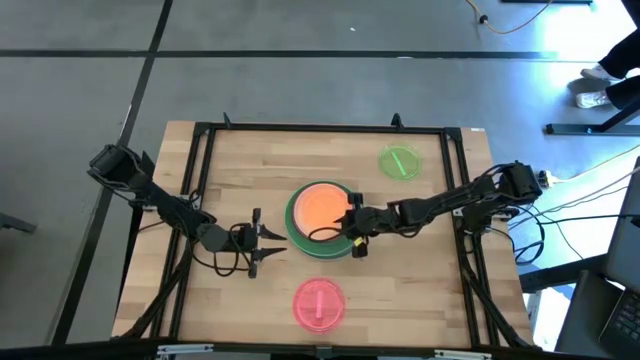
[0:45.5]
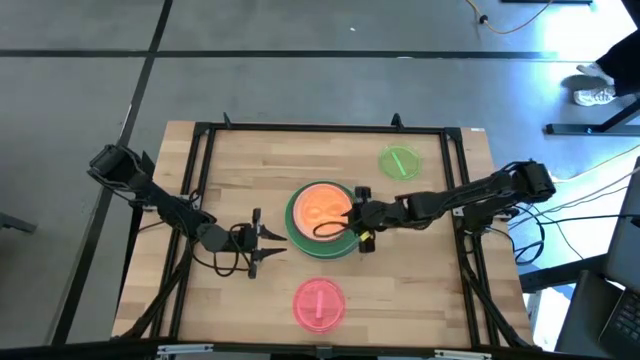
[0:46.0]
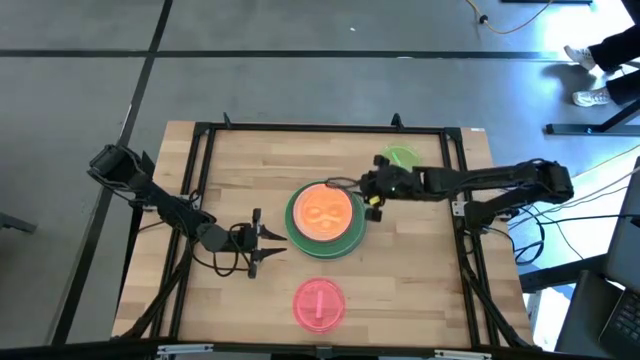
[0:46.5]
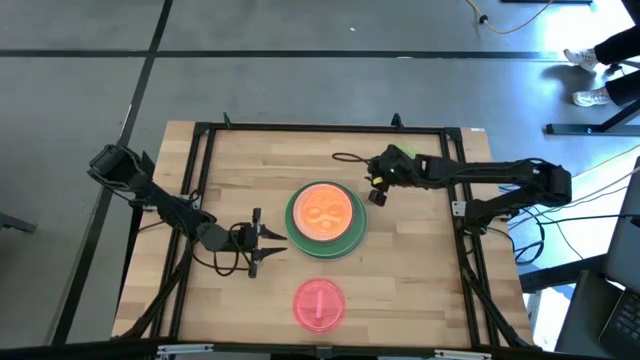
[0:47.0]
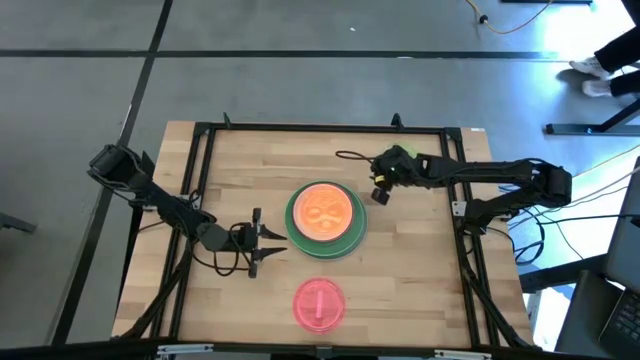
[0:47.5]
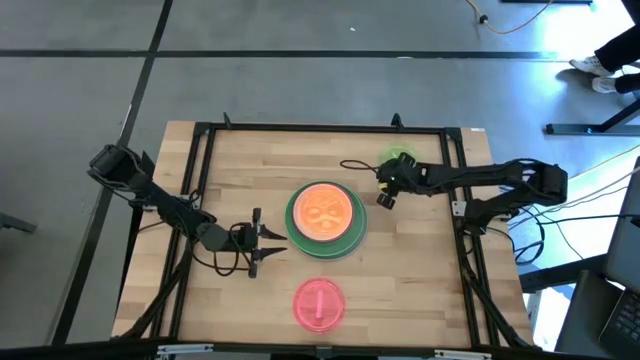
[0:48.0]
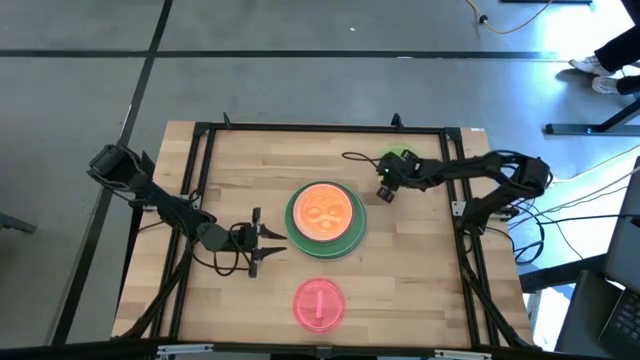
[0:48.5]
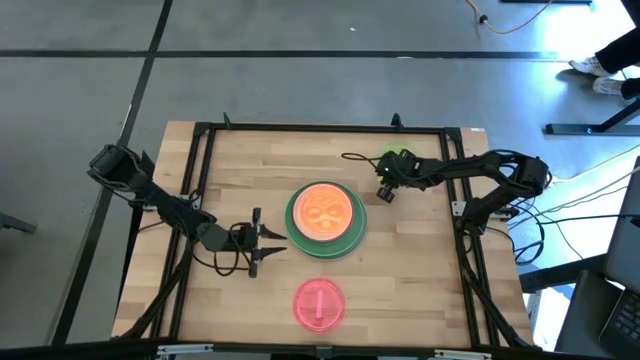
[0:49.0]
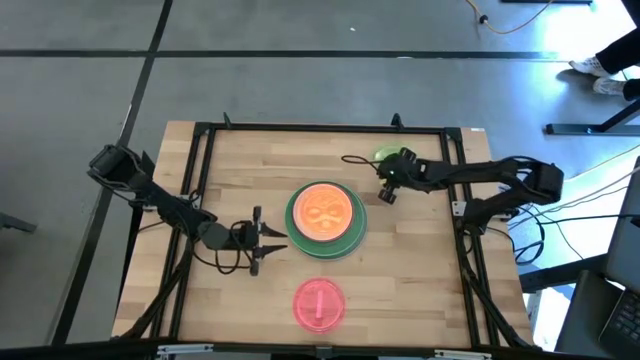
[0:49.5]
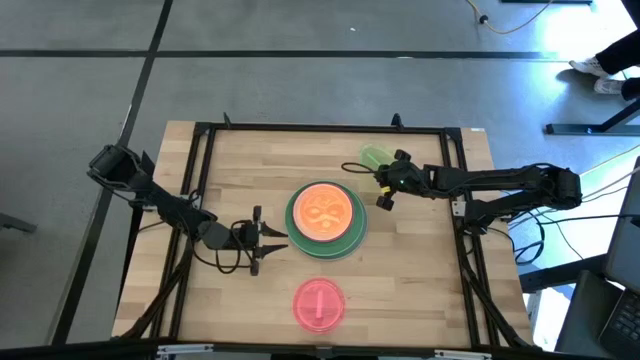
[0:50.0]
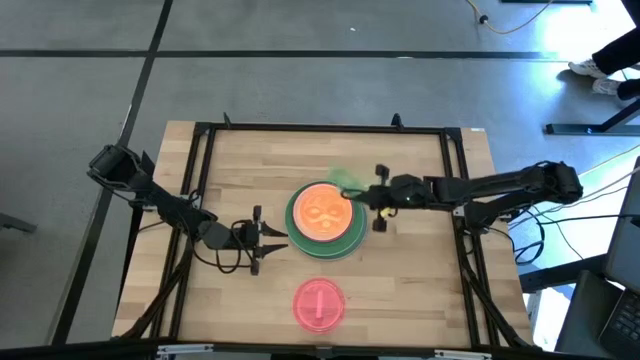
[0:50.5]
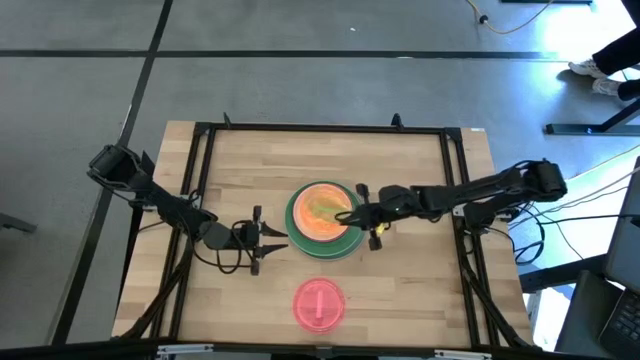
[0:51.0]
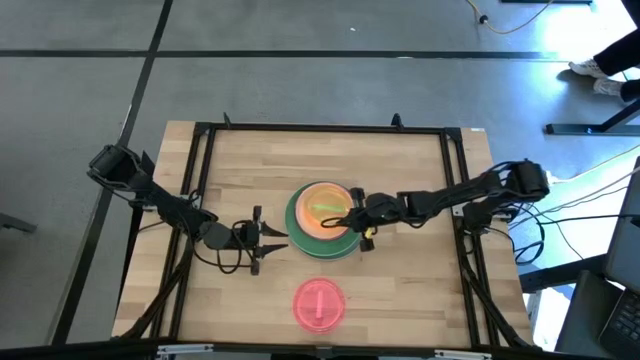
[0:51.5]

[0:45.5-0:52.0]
Task: Stack plastic plates
Stack the light green plate on top of the orange plate

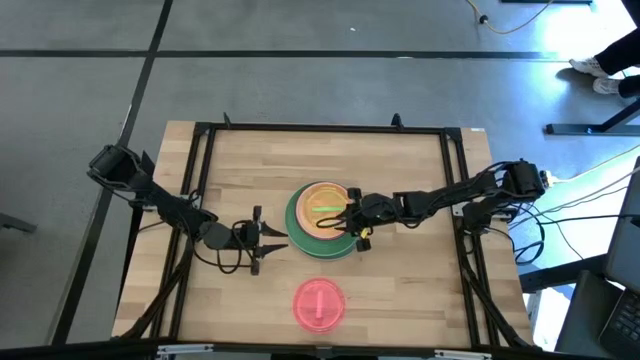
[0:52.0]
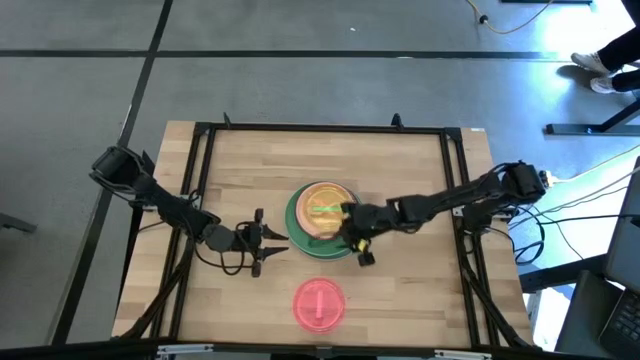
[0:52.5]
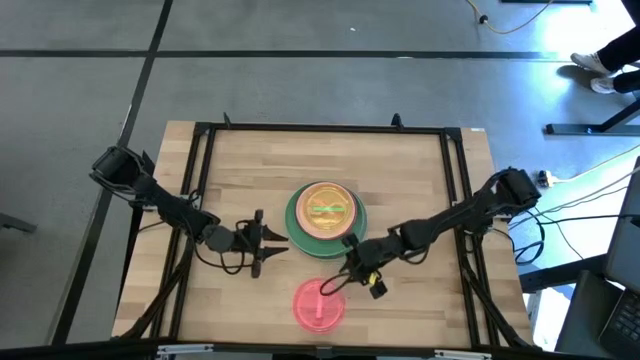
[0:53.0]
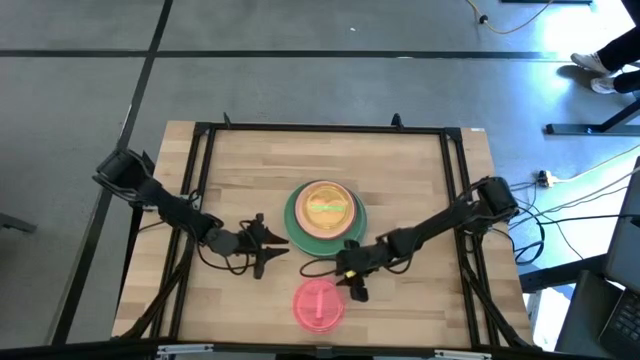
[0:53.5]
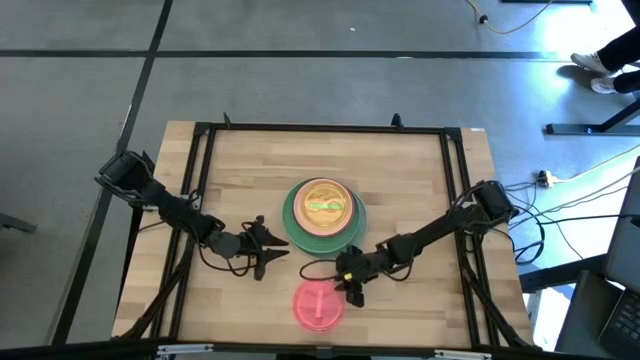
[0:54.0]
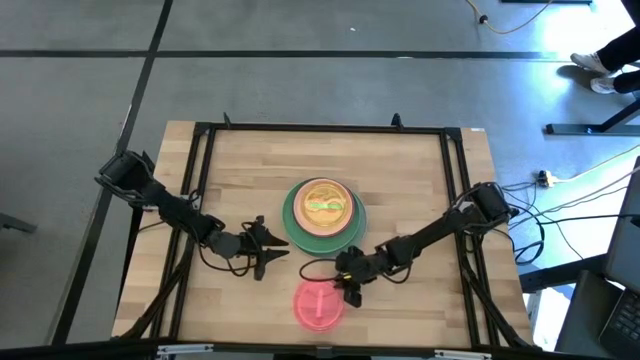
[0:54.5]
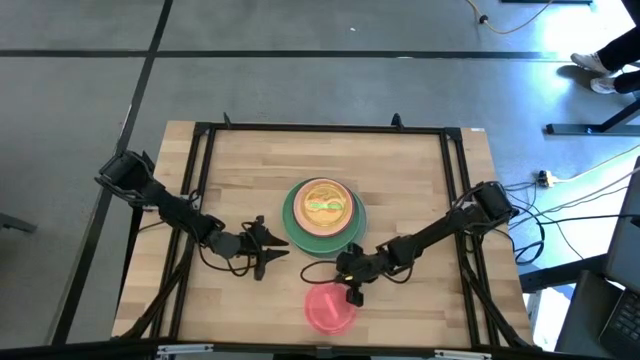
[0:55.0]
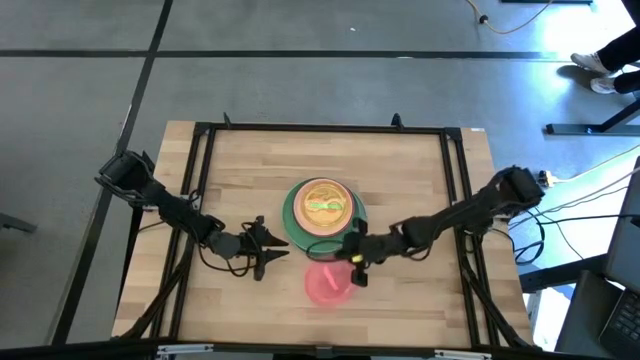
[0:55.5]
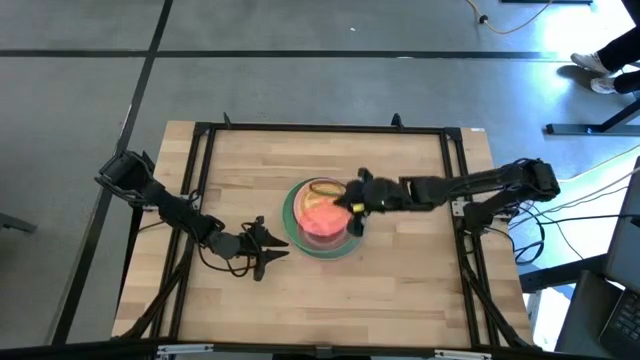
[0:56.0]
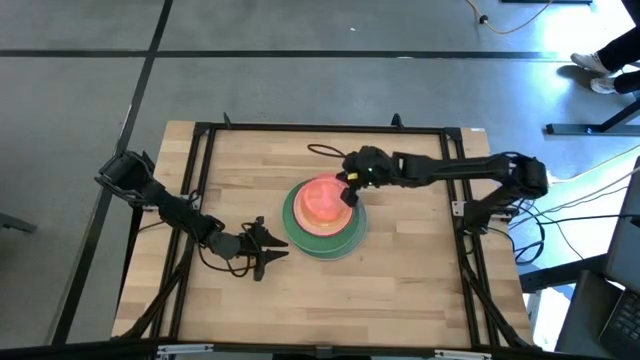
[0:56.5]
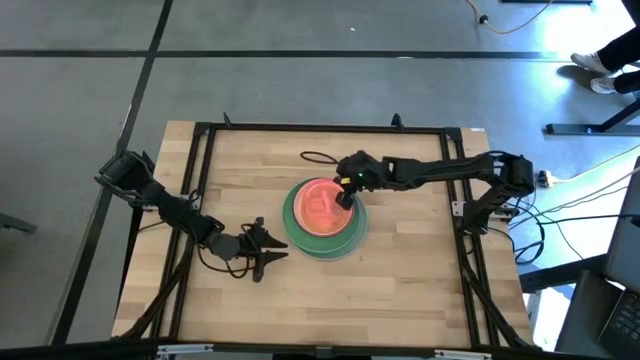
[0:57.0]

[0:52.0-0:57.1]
Stack the light pink plate on top of the light green plate

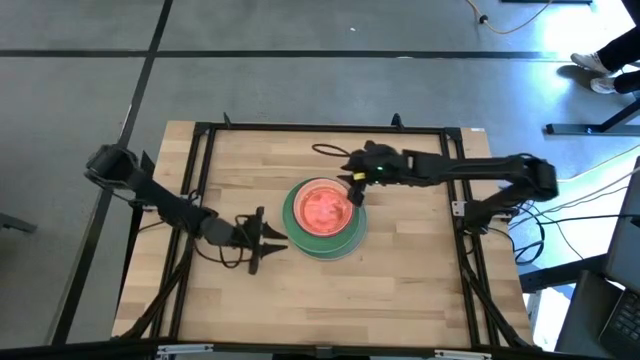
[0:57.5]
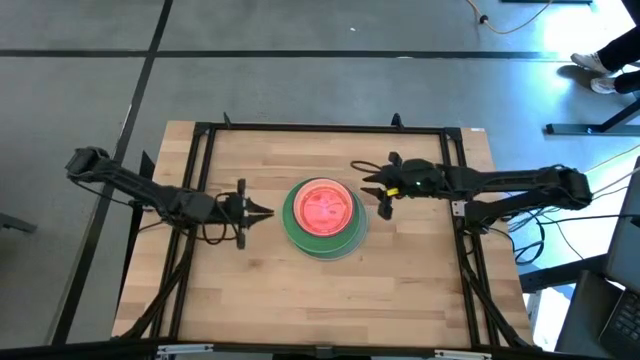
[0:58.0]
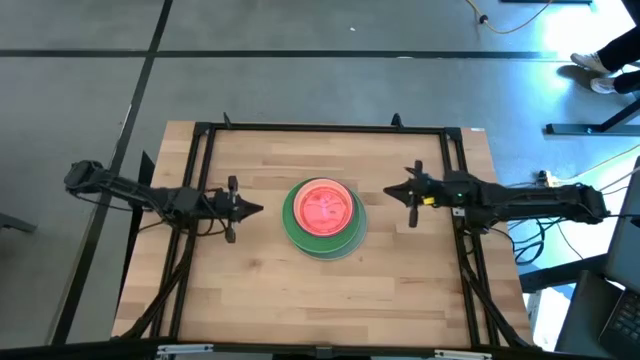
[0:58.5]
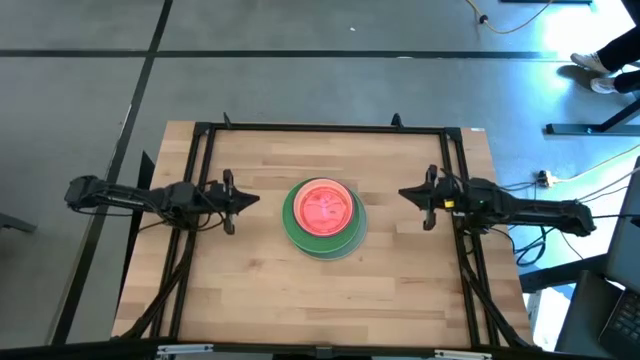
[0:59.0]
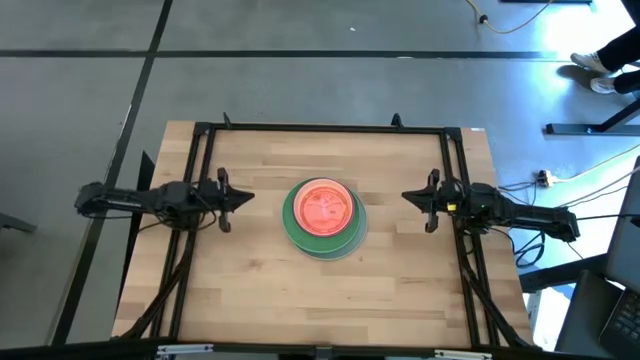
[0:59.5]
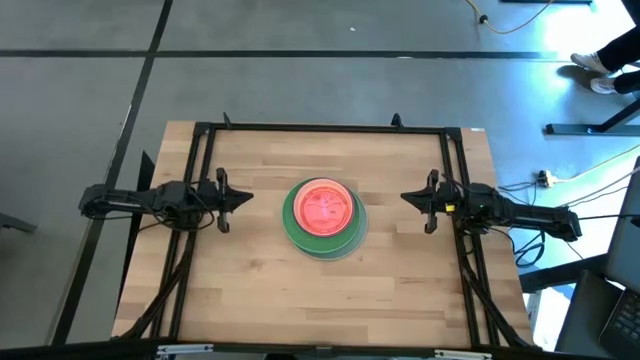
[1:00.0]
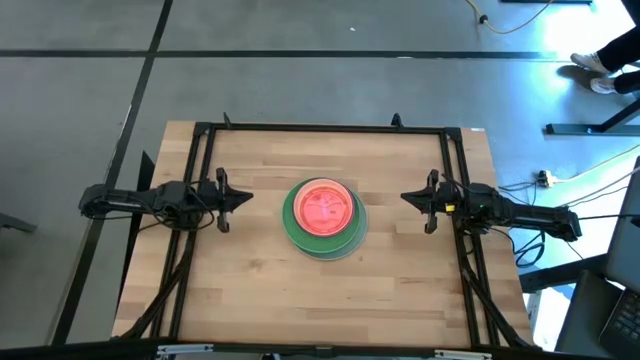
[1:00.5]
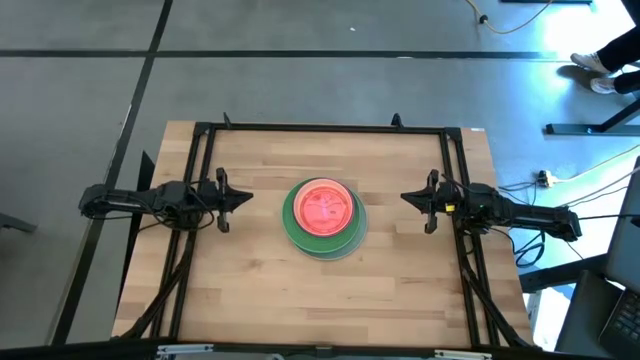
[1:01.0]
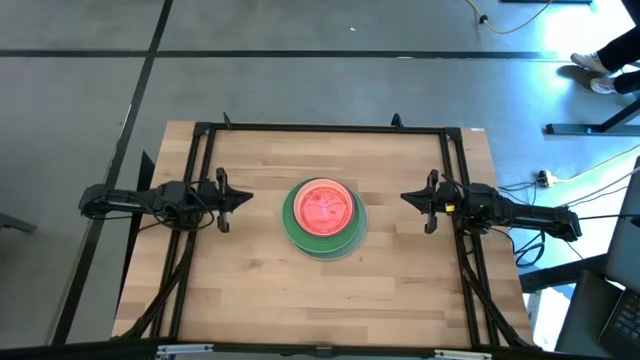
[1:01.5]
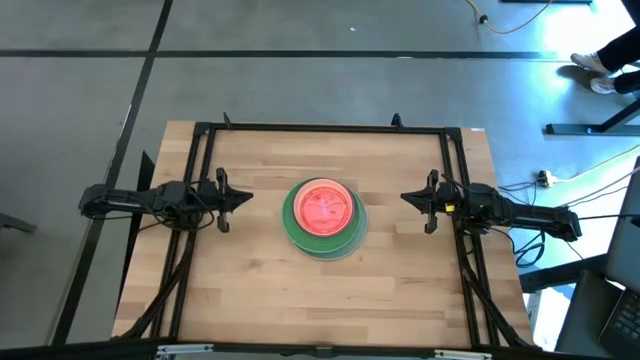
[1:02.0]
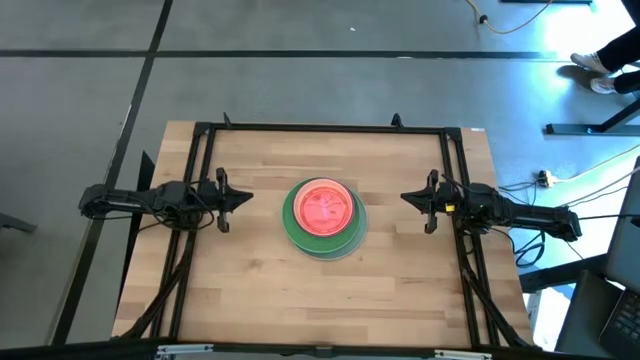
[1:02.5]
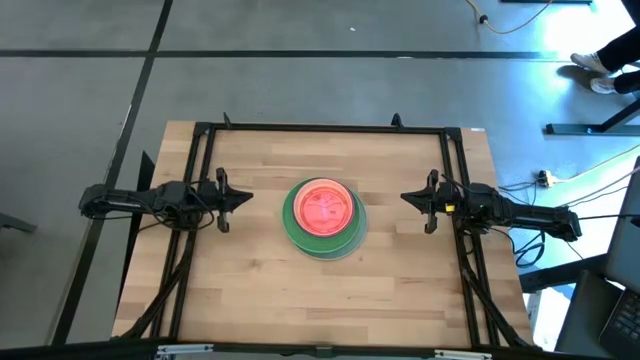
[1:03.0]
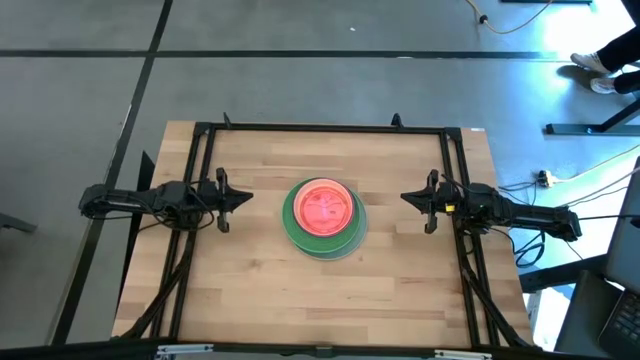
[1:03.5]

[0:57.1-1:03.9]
Return to Home Position

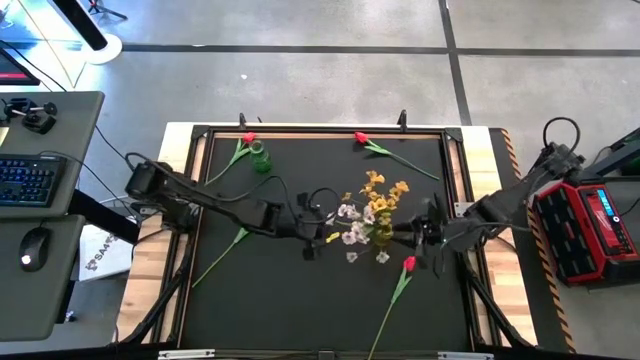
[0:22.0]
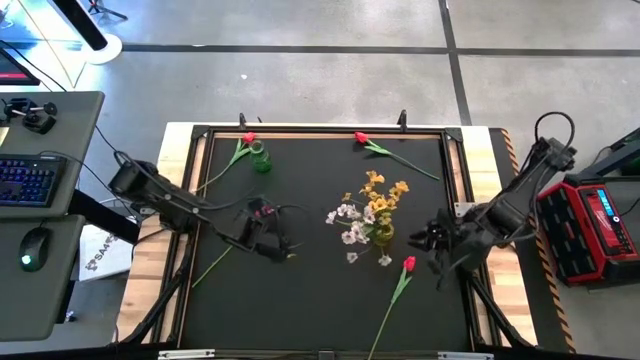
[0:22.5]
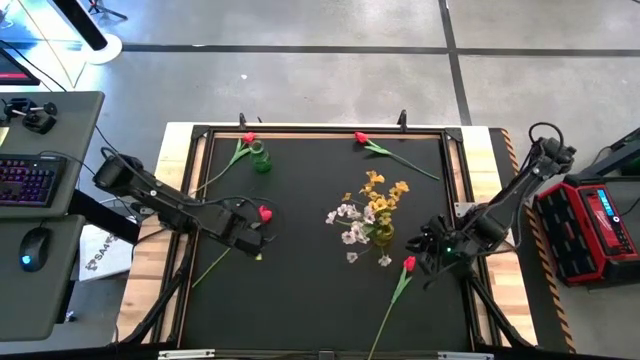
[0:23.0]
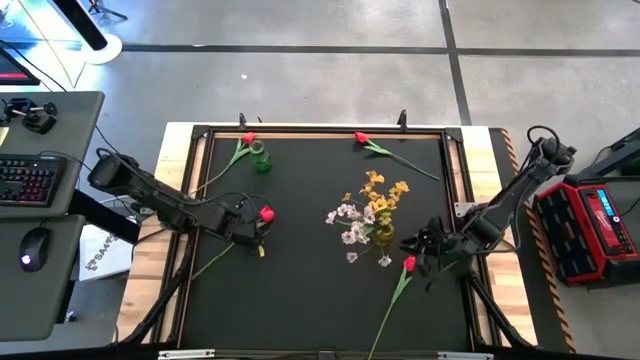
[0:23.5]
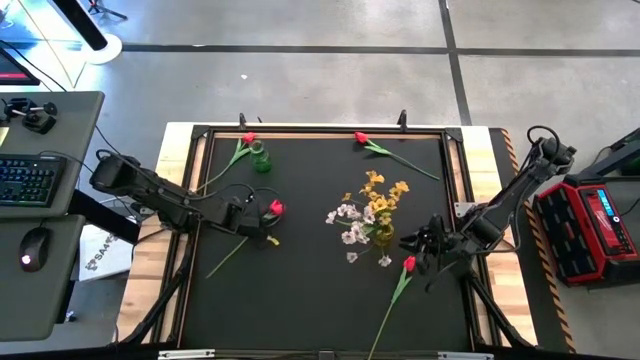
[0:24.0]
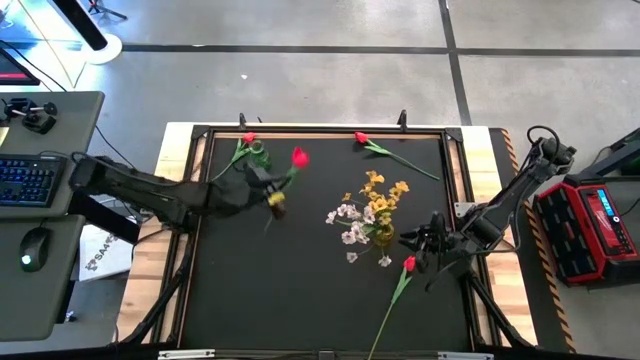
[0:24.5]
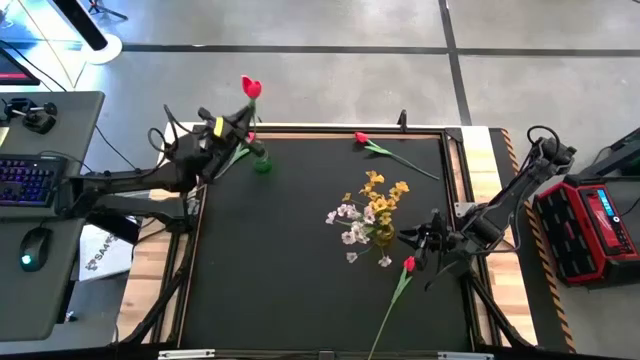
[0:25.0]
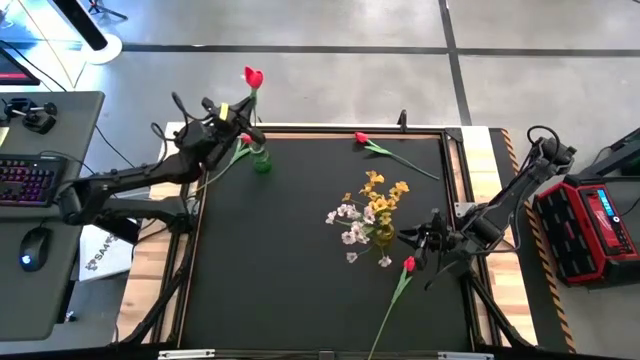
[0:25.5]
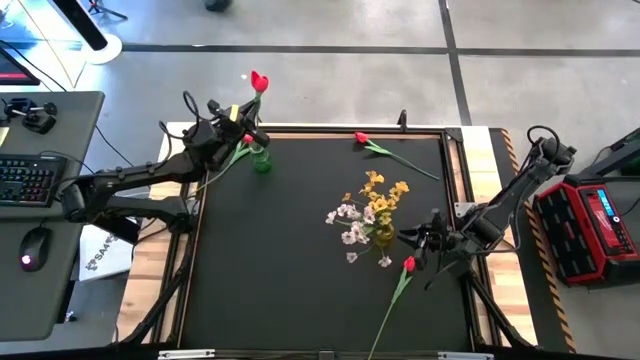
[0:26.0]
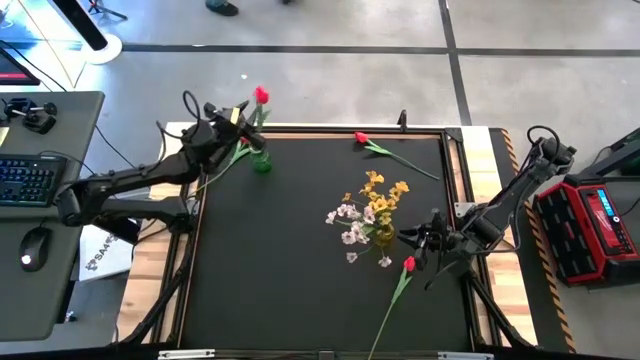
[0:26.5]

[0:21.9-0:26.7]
Task: Sort flowers into vase by color
Put the bottom left red tulip into the green vase
